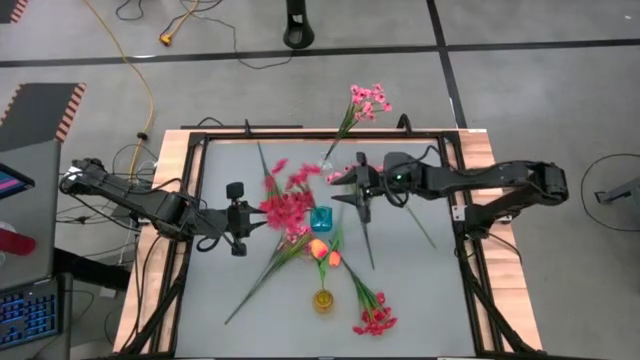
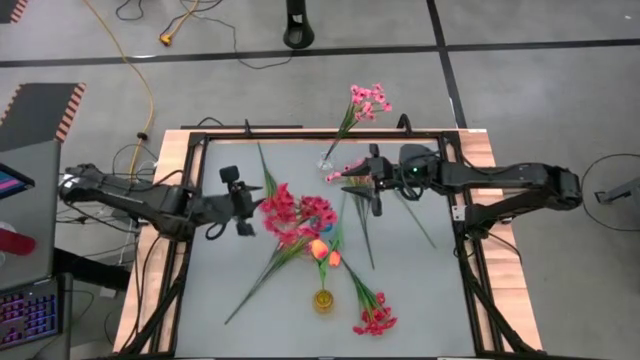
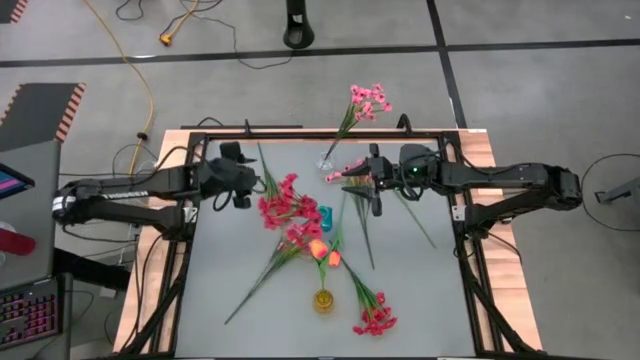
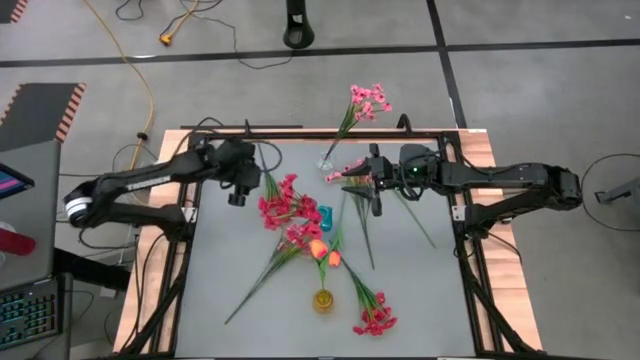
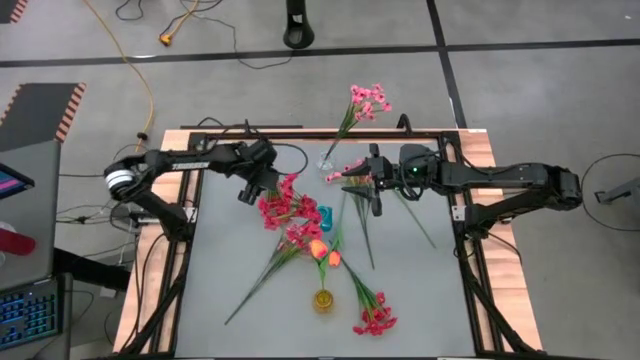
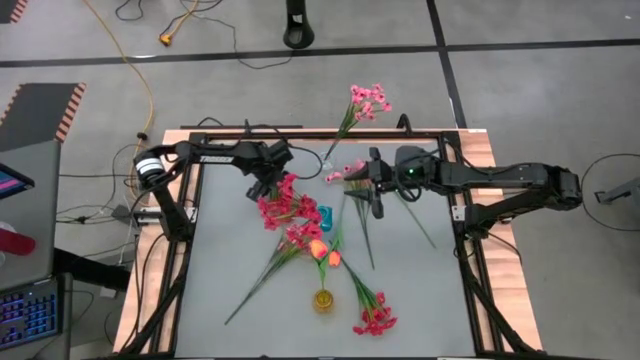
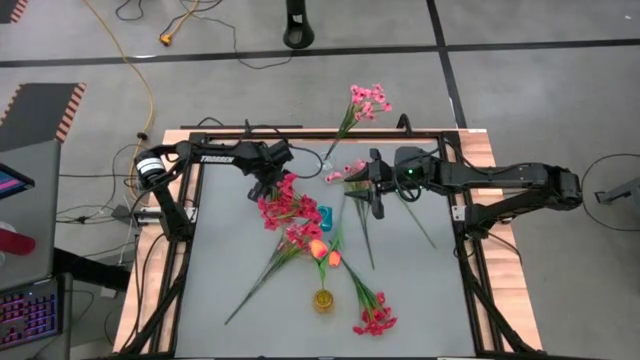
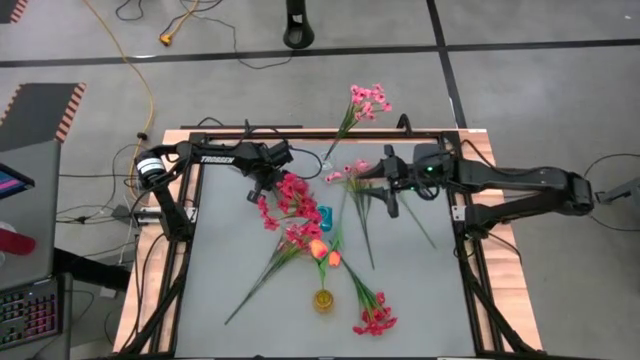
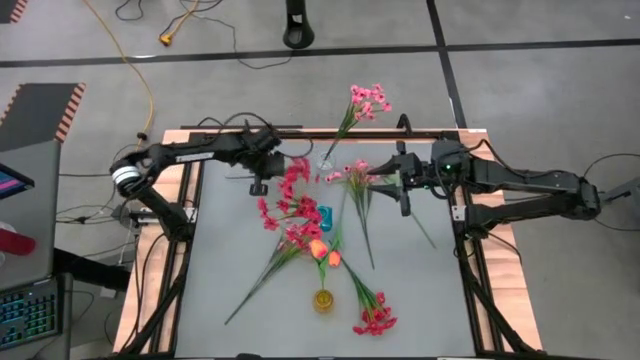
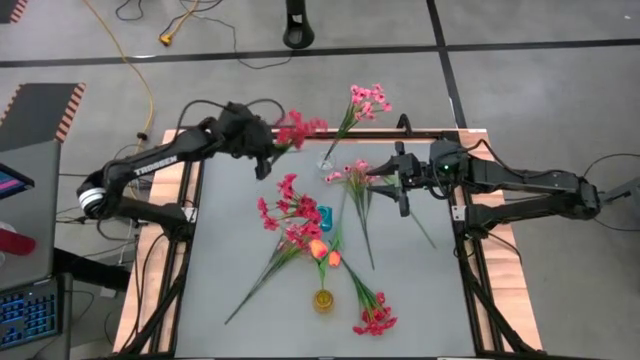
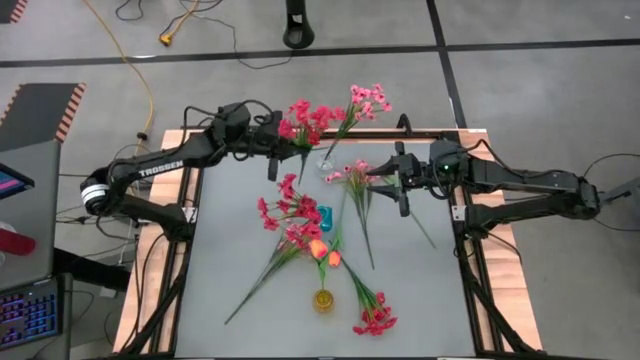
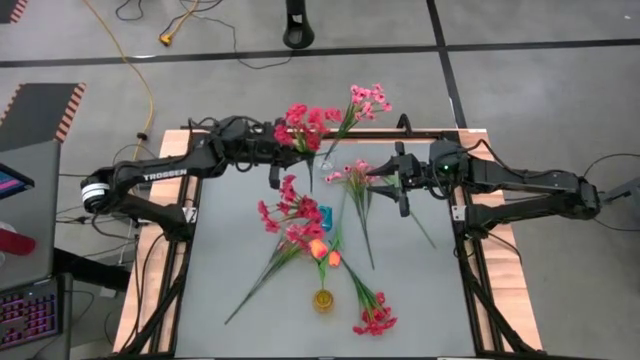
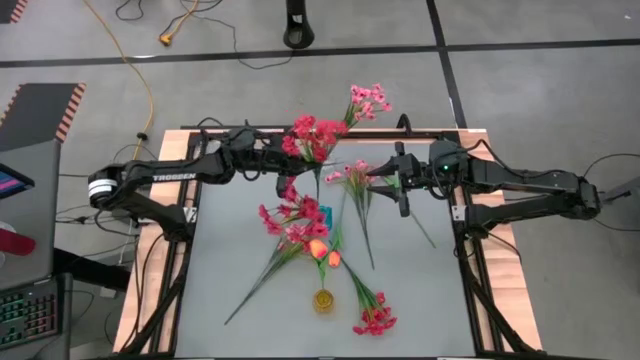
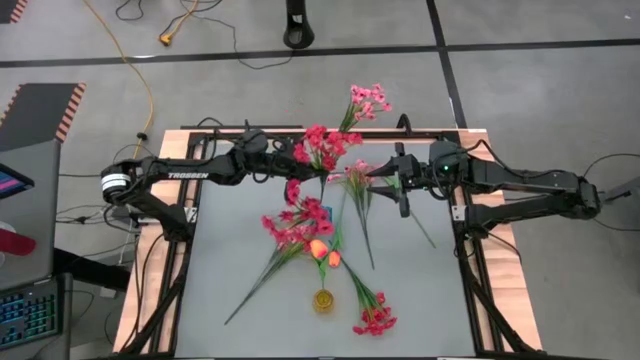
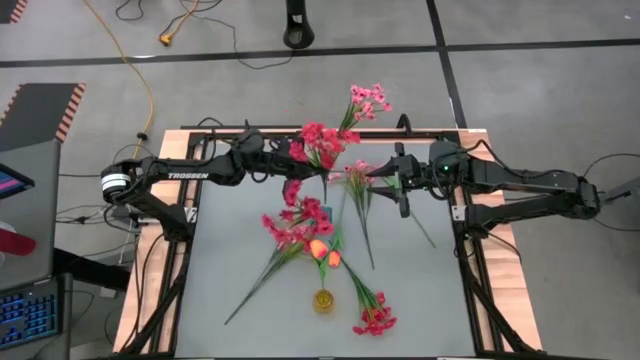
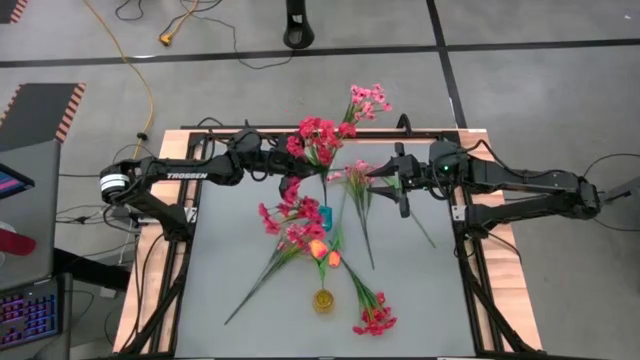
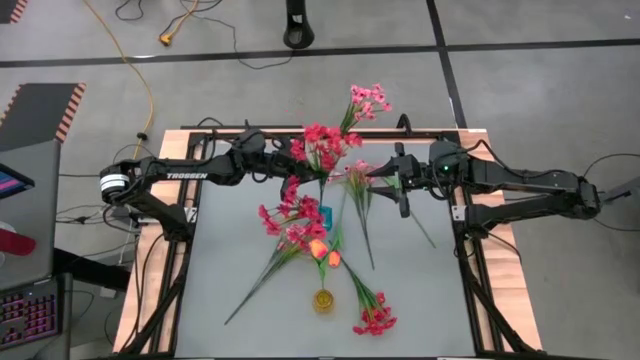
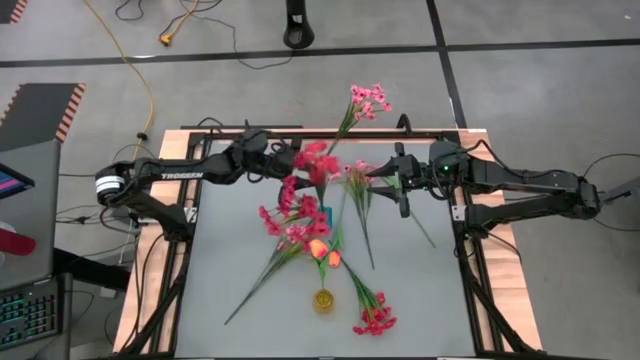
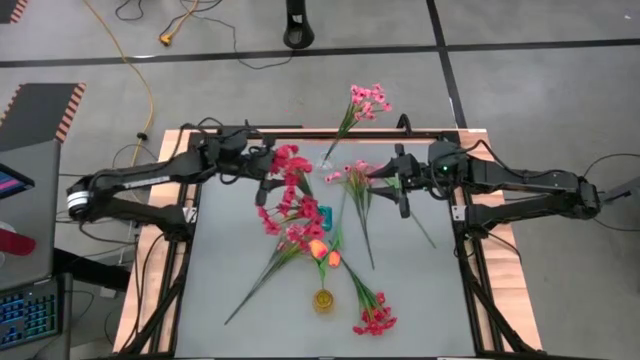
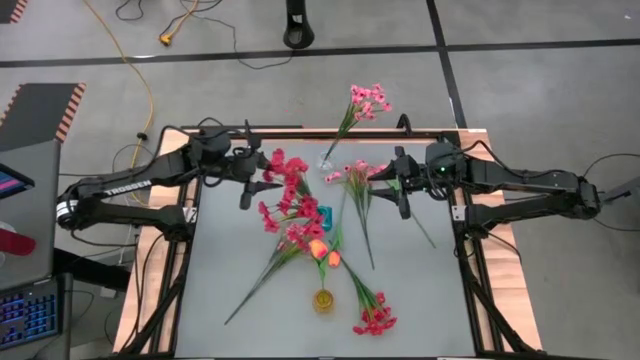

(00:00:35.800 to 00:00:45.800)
Task: Sort flowers into vase by color
Put the top red flowers into the blue vase

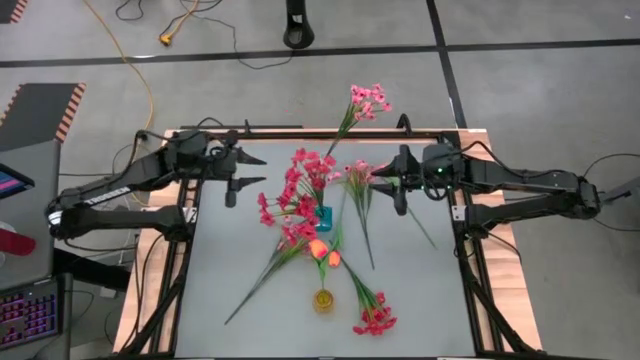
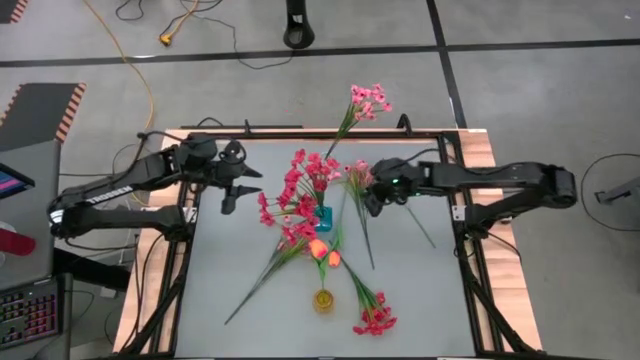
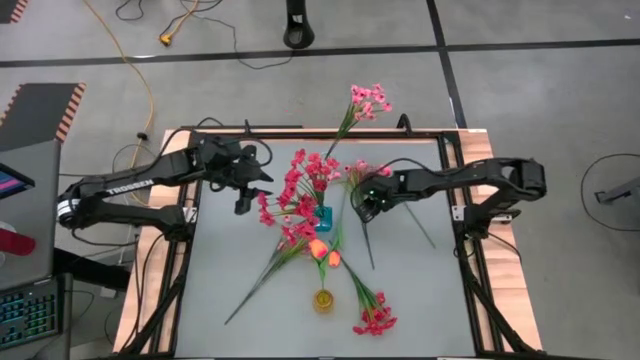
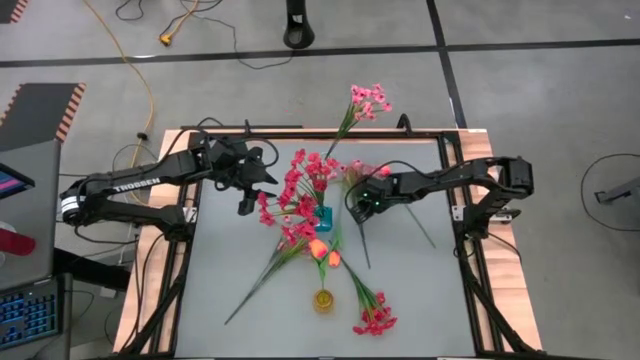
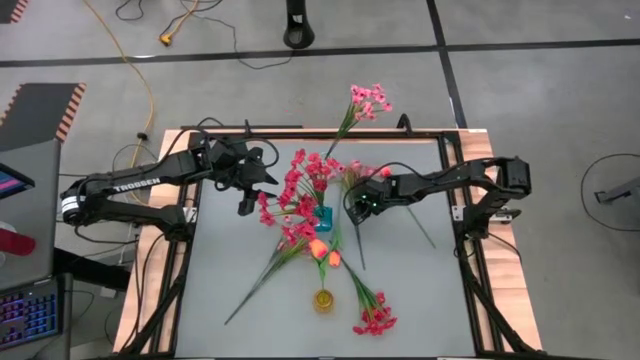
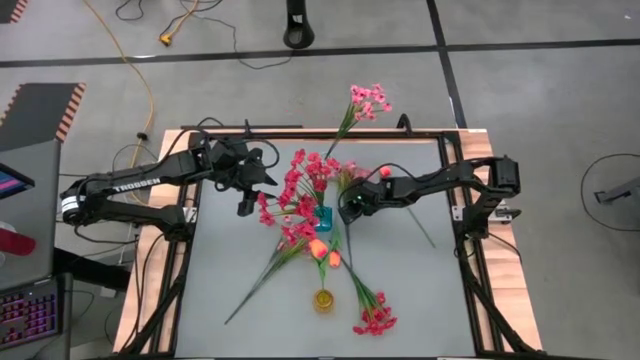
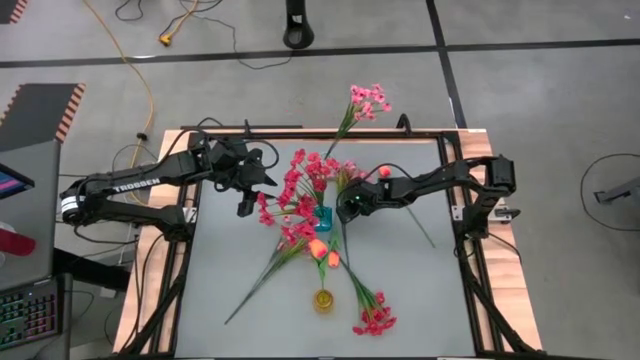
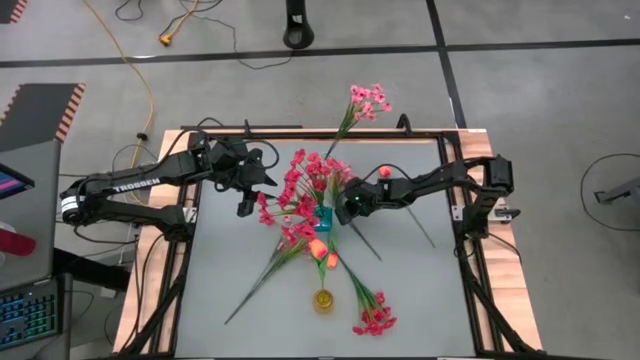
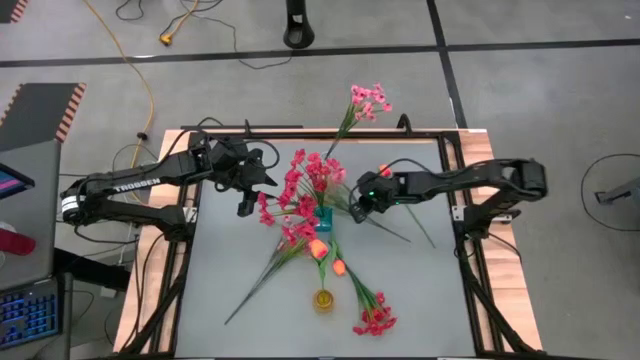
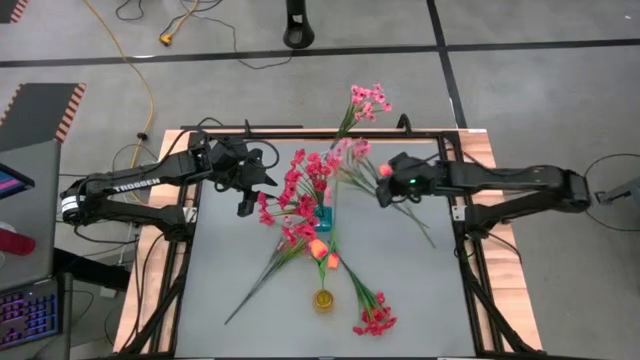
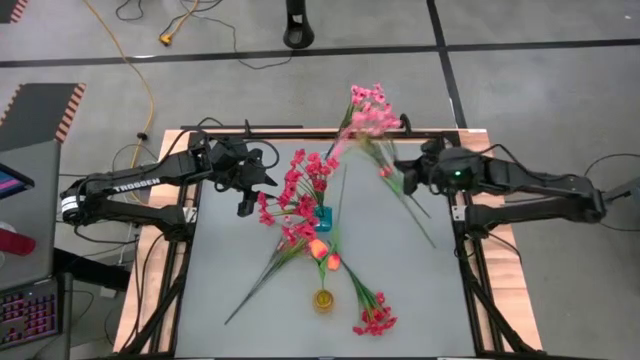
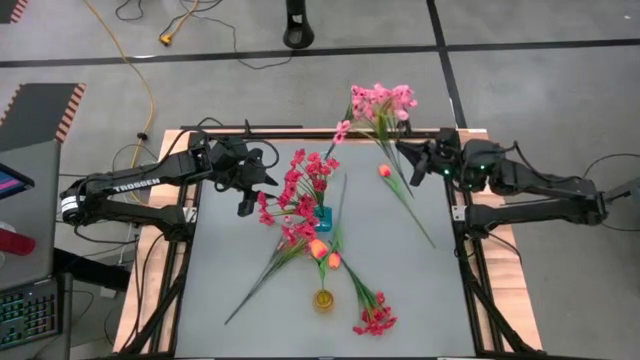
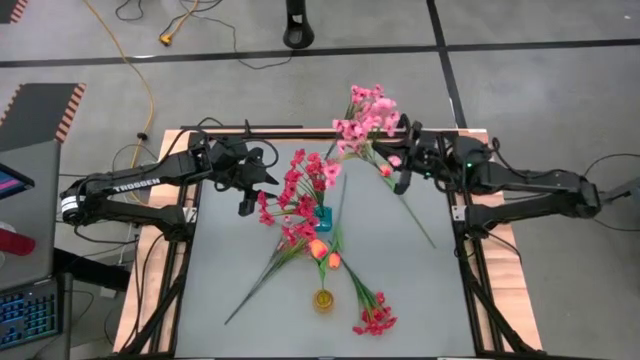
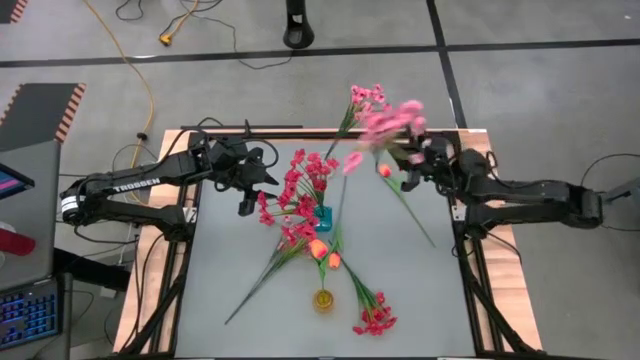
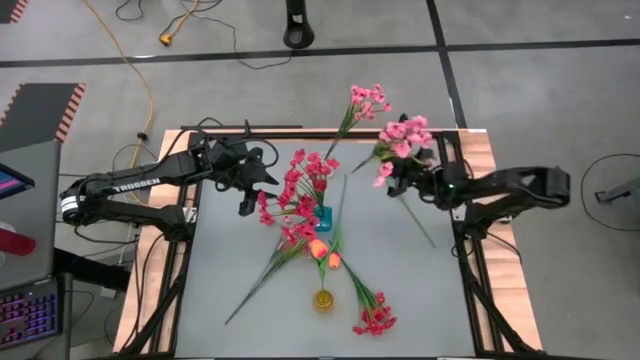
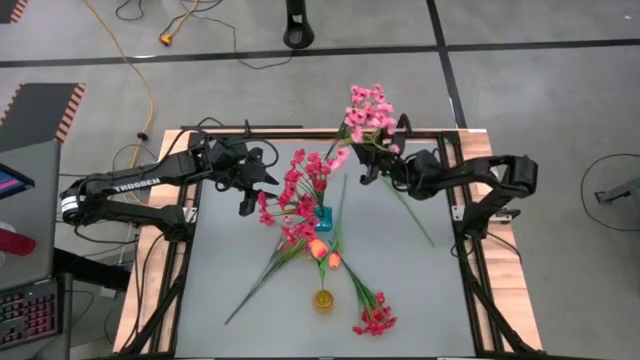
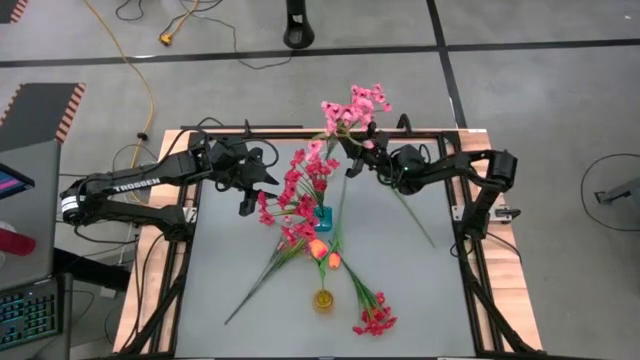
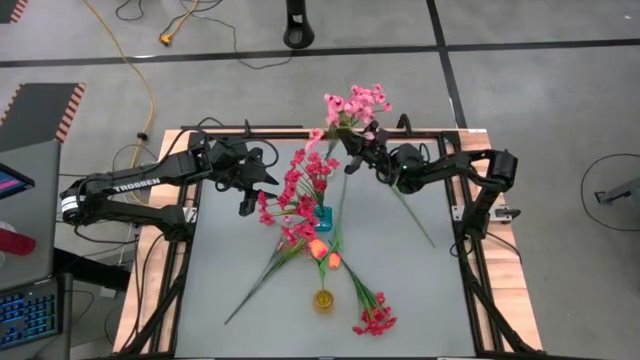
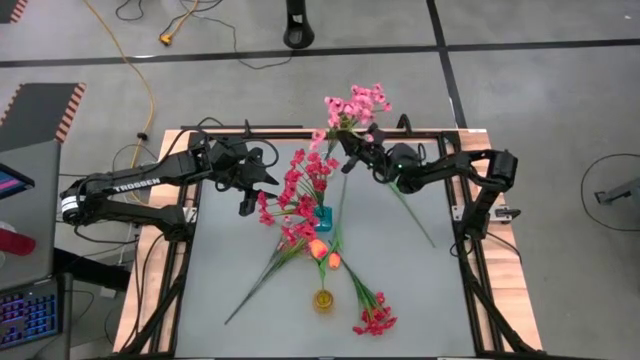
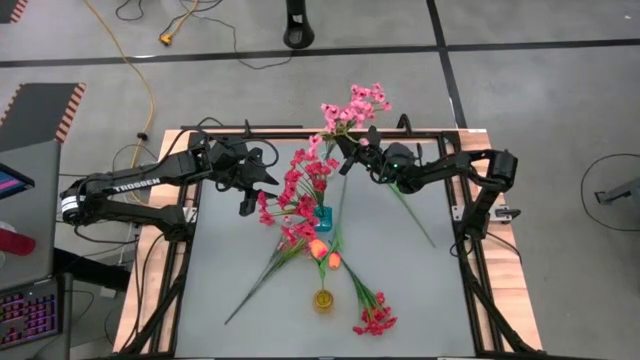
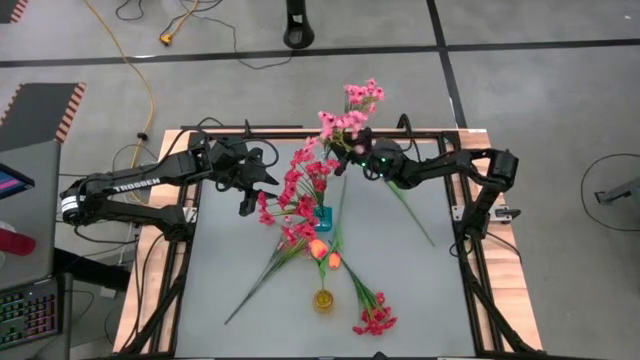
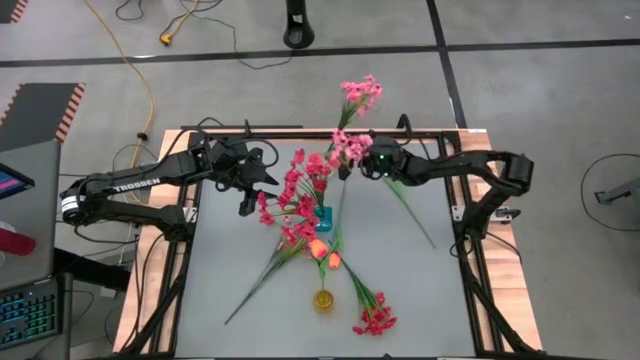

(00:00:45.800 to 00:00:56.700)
Put the top pink flowers into the transparent vase

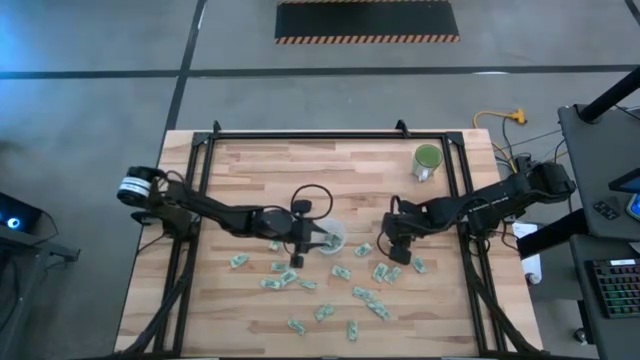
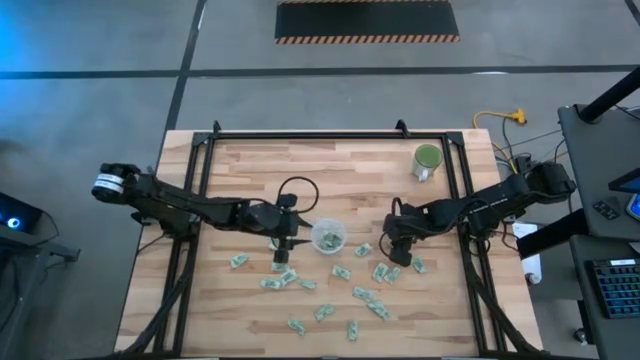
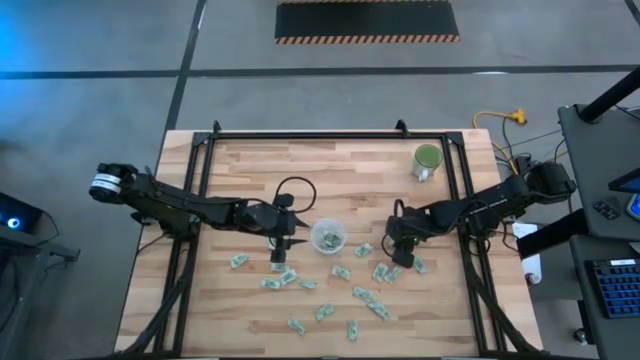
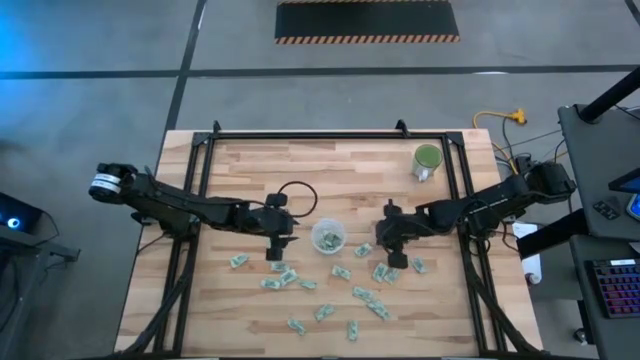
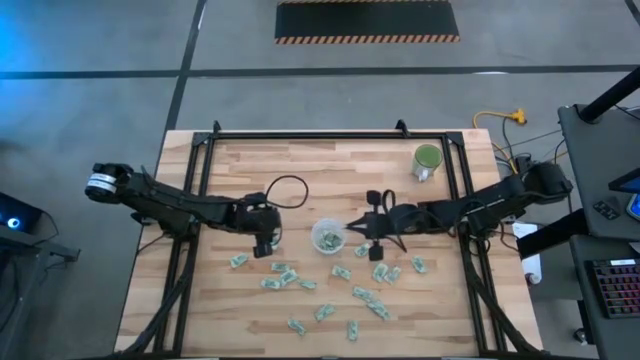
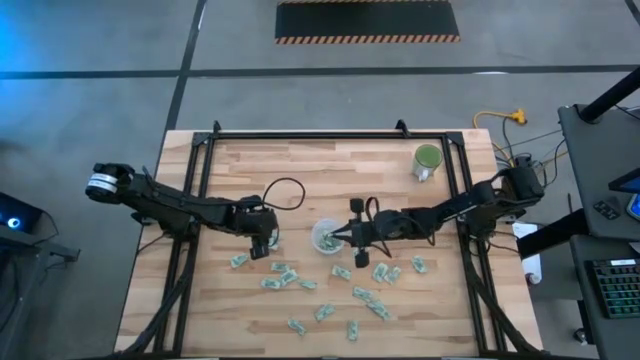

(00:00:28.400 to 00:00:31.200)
Task: Pick and place Stevia / Truvia into bins
Put the light green stevia packet into the transparent container
